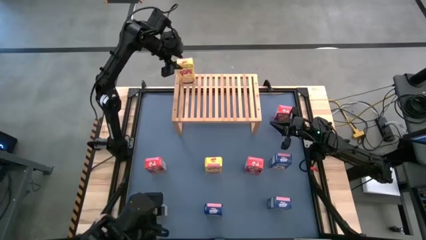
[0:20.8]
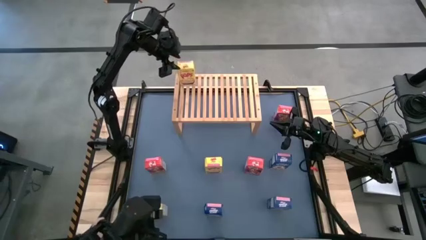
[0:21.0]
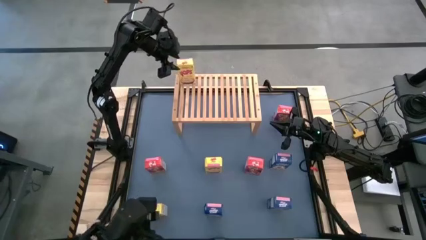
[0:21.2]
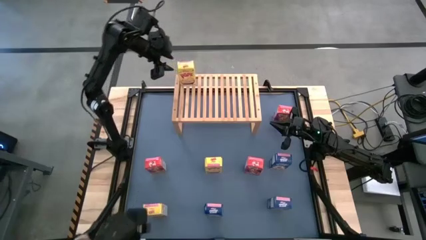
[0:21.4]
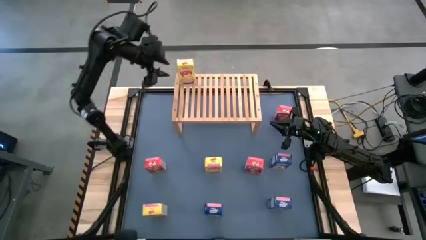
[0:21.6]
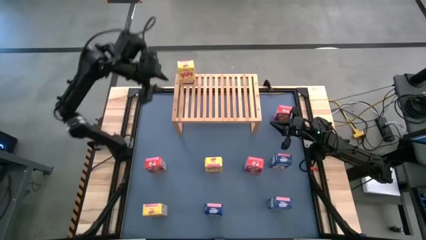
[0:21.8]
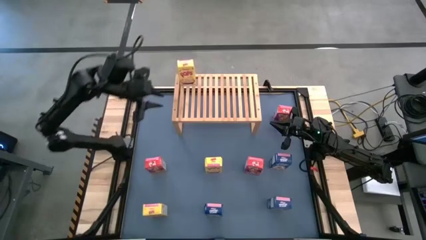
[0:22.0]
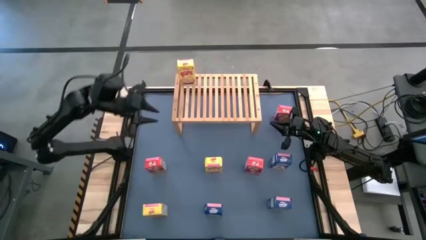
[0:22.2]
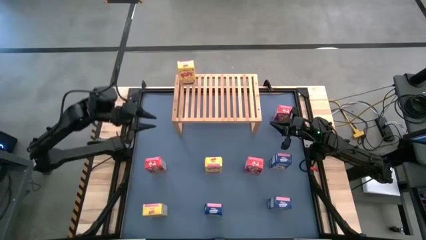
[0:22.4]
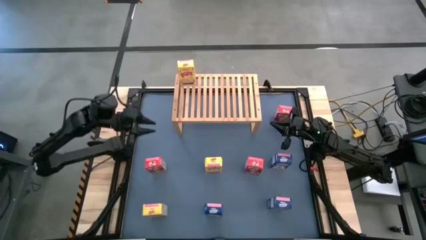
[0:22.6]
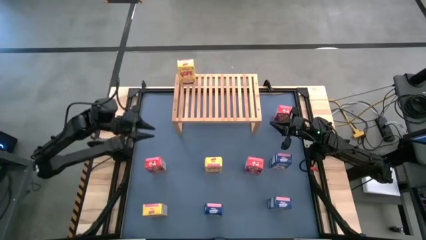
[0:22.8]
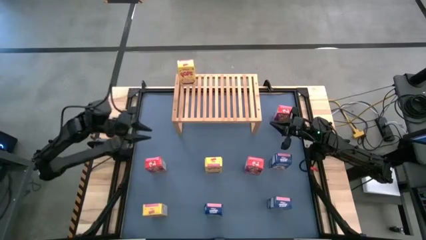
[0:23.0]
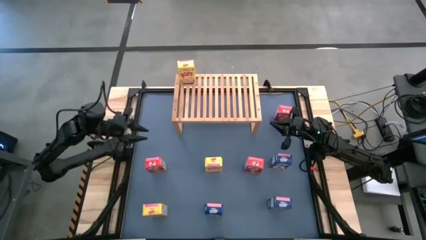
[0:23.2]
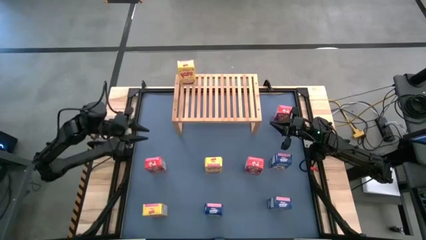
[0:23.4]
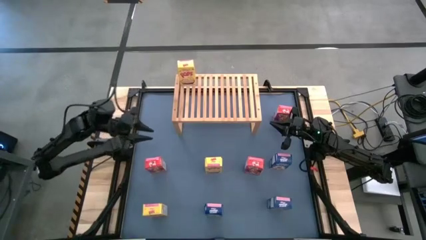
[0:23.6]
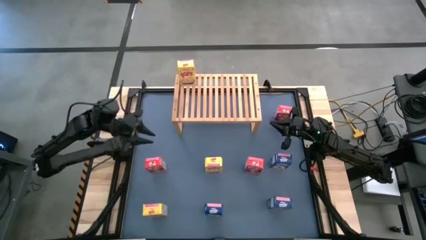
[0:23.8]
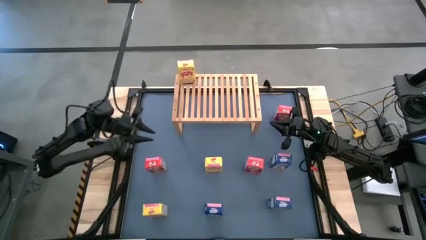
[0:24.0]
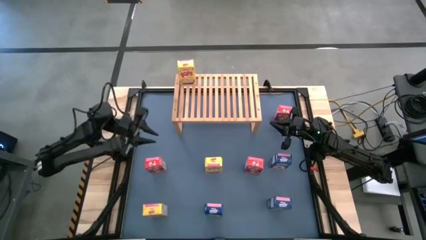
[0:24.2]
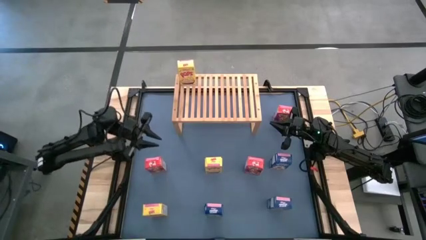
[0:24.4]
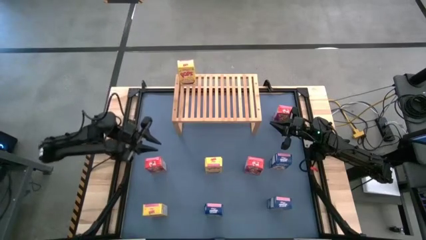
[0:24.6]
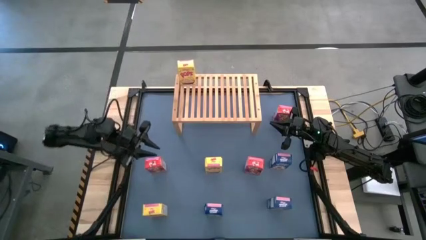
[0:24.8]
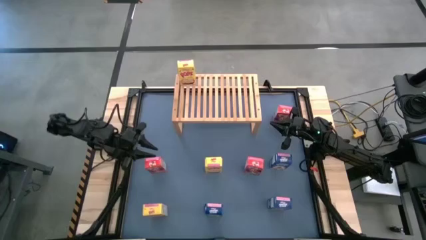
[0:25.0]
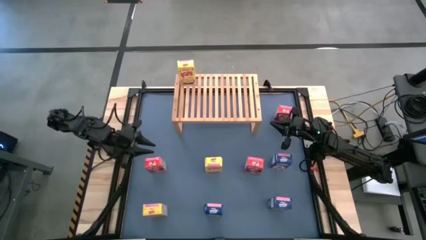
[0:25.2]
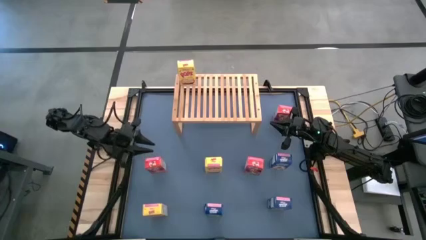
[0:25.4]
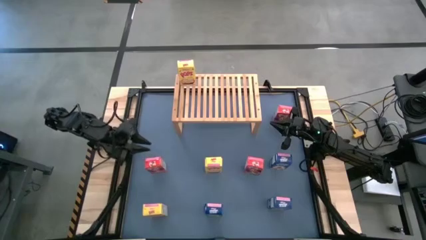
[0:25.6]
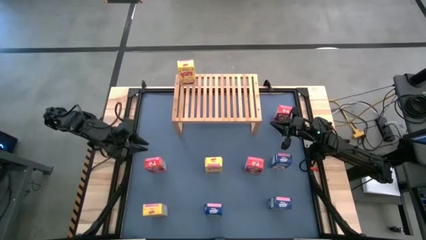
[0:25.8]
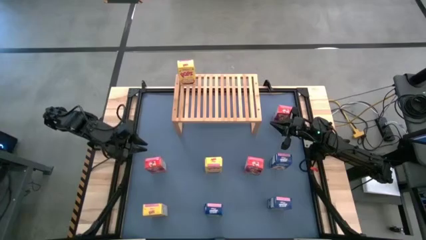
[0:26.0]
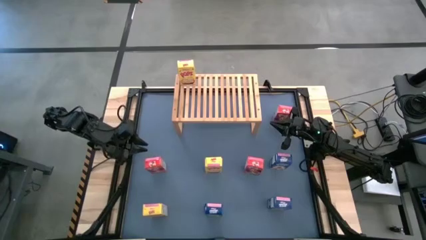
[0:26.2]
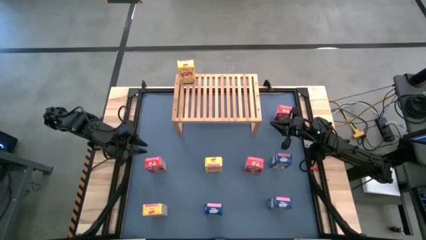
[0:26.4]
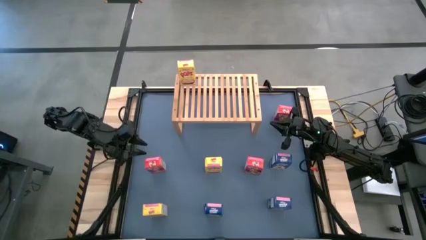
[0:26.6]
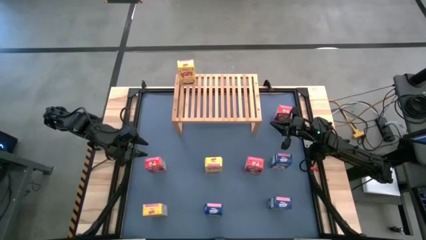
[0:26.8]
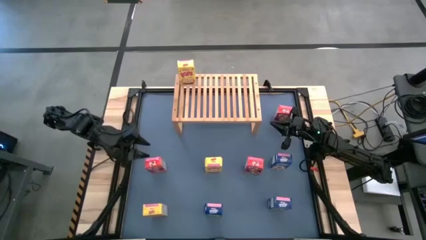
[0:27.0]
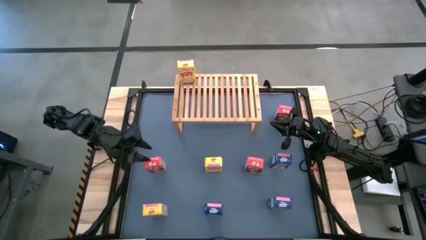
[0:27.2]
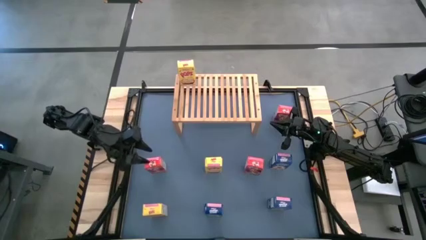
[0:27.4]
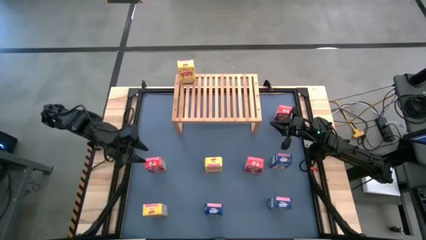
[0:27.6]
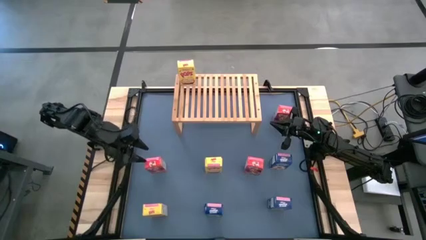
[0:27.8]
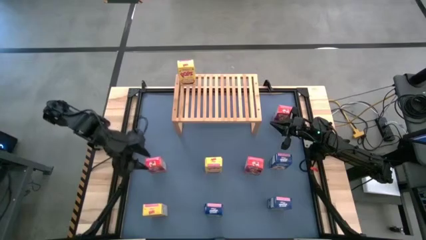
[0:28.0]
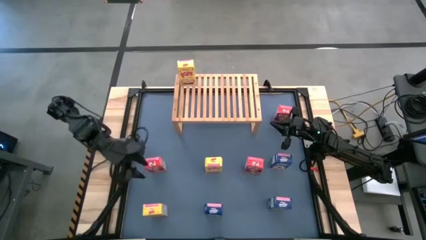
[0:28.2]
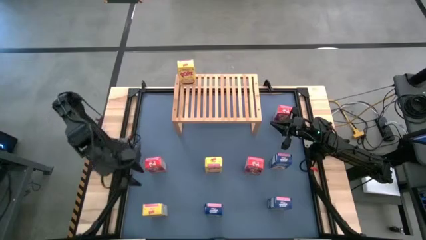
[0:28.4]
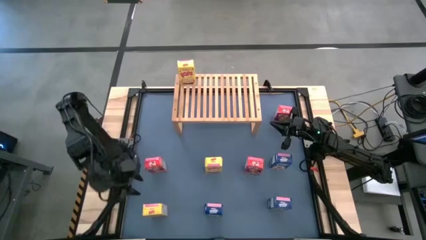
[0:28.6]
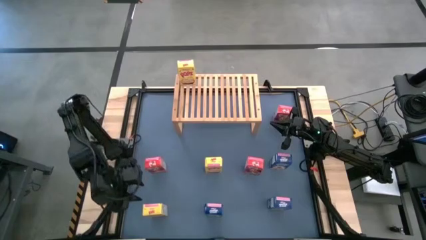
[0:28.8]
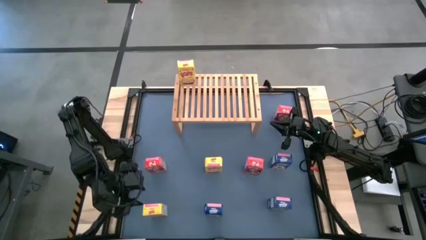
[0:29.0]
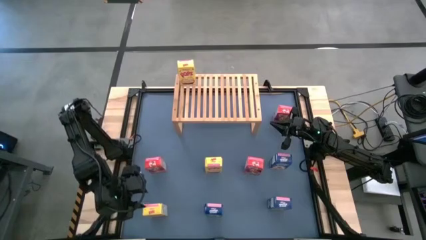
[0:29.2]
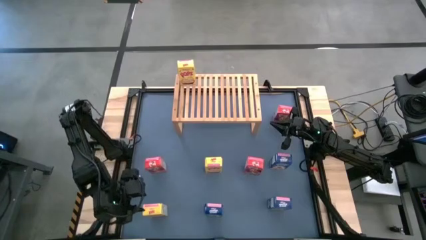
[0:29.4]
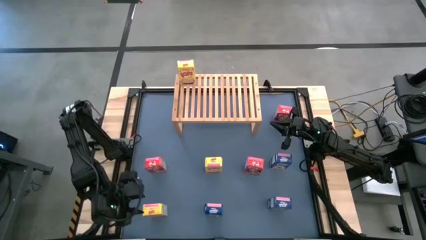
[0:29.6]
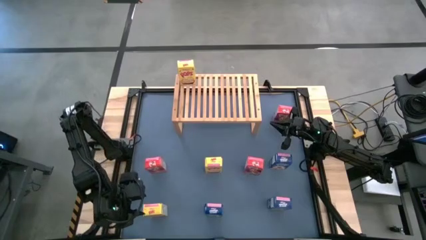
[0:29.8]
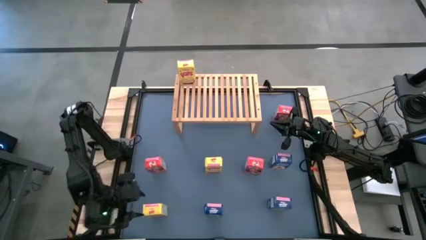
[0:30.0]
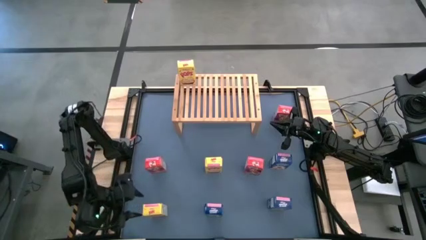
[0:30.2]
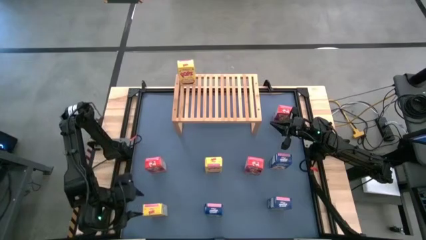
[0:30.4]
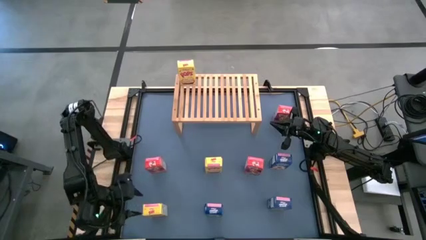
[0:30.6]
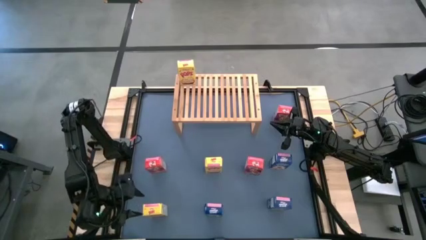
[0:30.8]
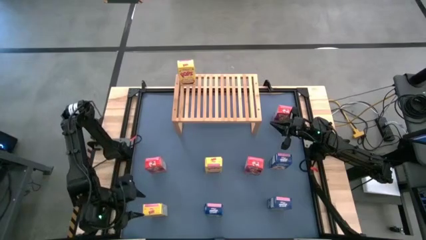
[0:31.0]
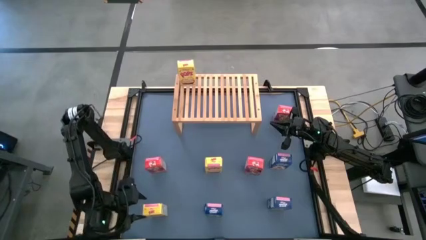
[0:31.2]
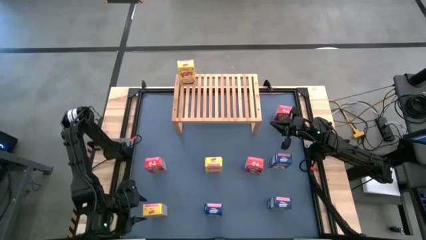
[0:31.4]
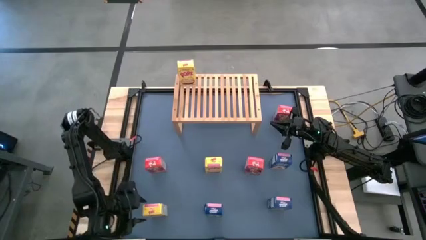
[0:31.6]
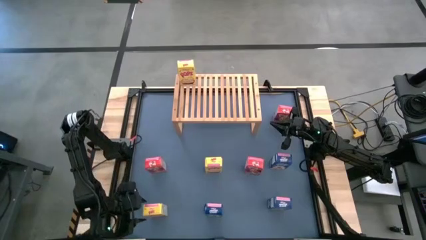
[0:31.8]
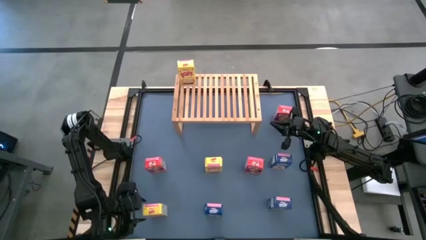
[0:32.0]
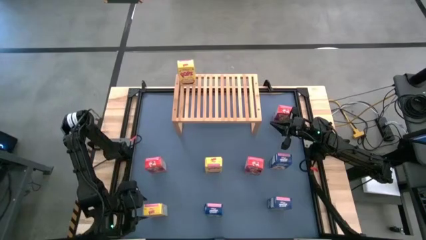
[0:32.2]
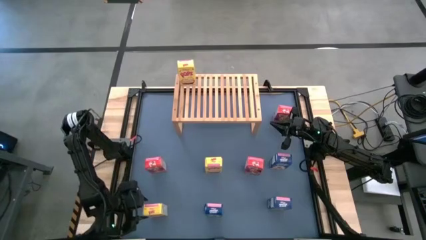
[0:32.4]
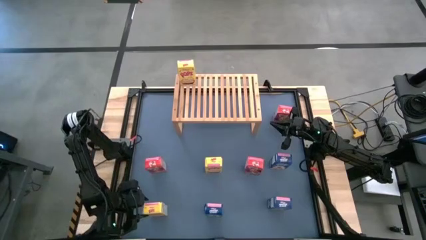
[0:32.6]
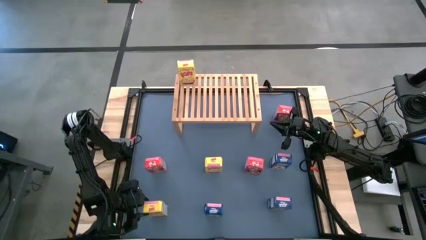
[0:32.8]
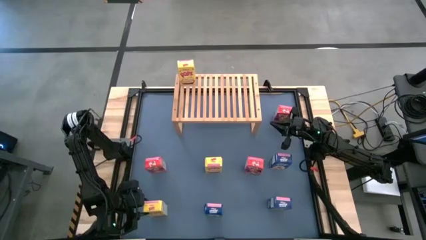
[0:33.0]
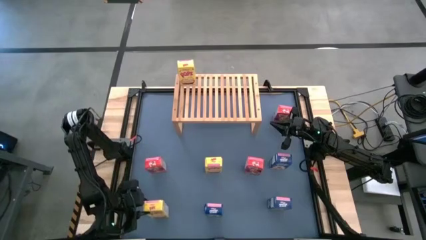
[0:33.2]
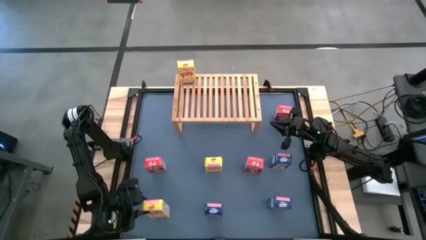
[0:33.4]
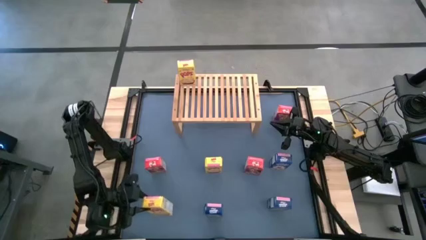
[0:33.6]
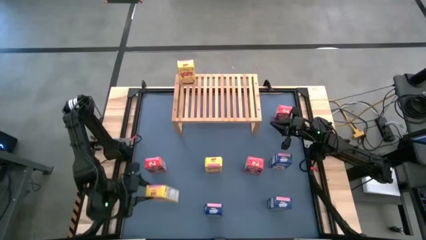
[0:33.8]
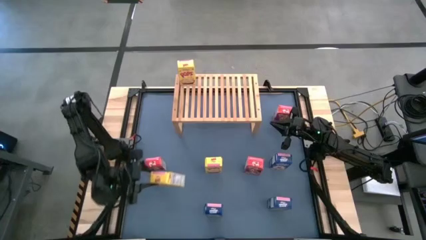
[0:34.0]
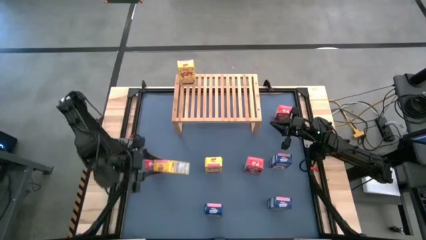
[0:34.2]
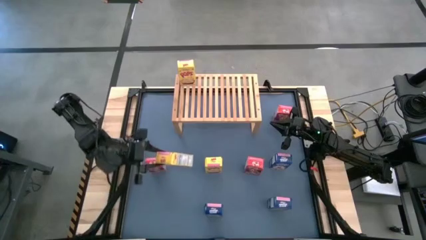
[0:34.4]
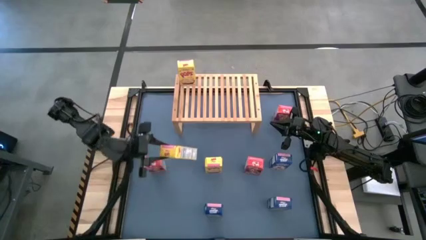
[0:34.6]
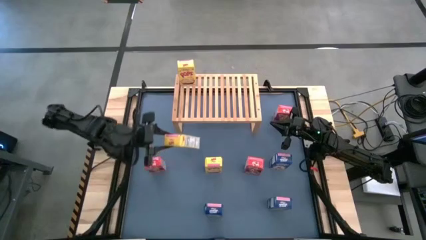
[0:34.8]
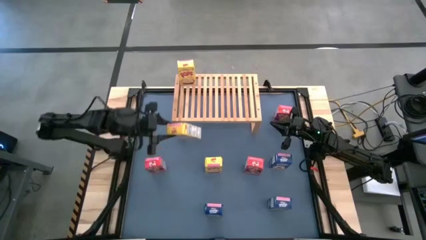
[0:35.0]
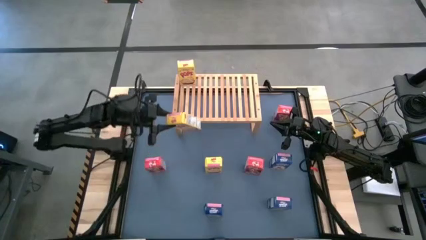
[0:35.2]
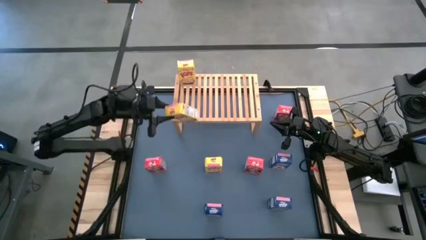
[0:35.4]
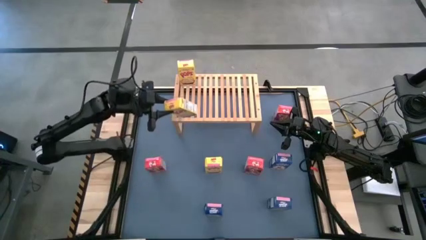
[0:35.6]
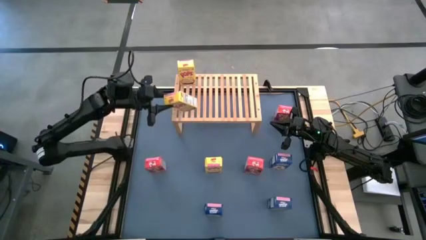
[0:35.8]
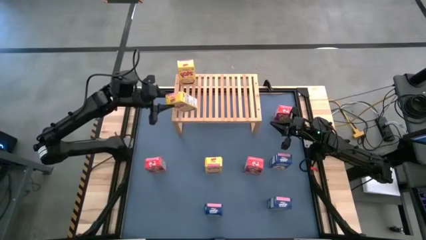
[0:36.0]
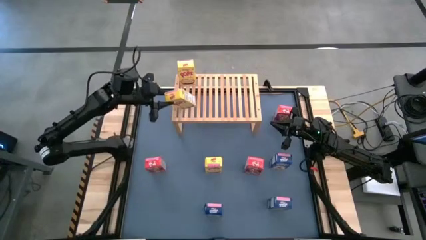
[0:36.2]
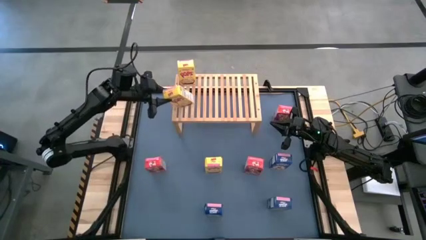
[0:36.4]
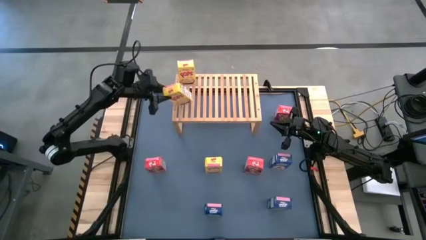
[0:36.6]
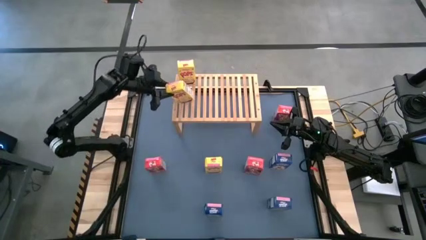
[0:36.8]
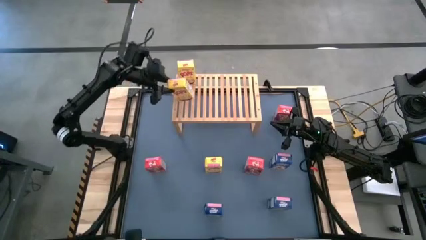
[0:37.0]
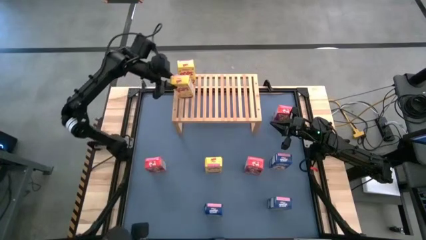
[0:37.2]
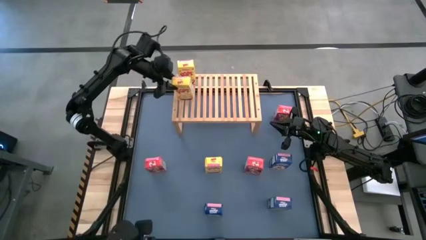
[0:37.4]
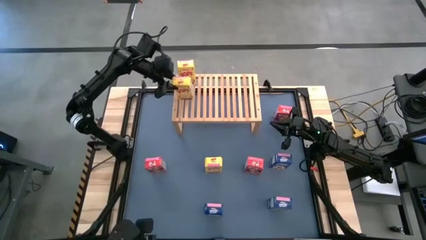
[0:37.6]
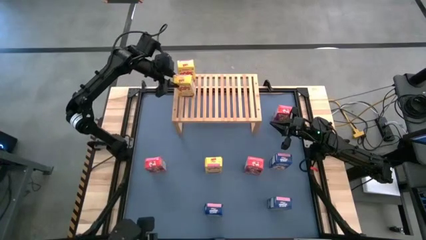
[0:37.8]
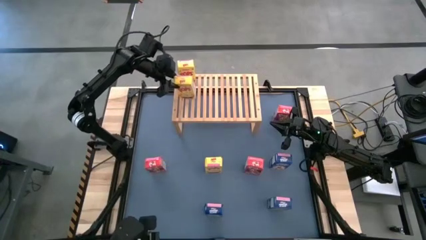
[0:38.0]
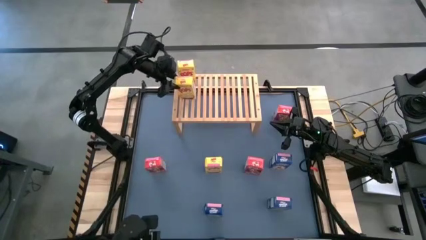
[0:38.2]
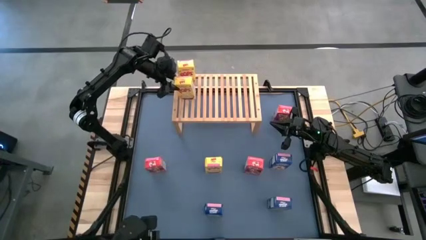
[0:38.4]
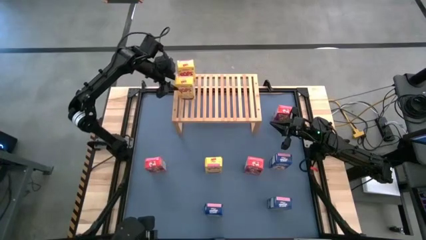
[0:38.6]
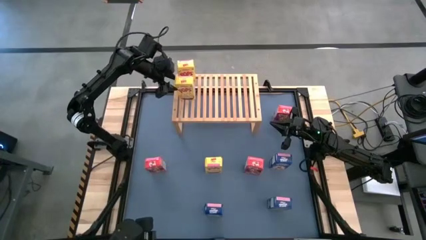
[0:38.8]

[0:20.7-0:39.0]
Task: Stack cereal on shelf
Put the bottom yellow cereal box on the shelf aligned with the other yellow cereal box
